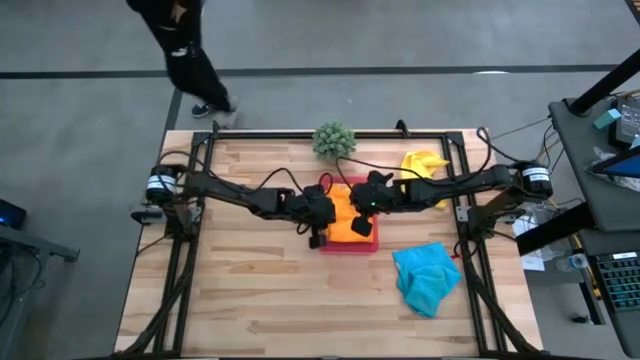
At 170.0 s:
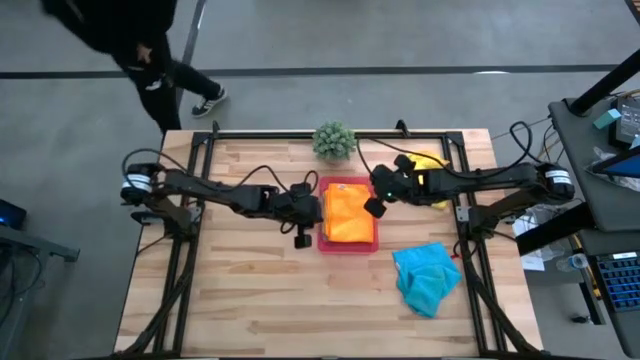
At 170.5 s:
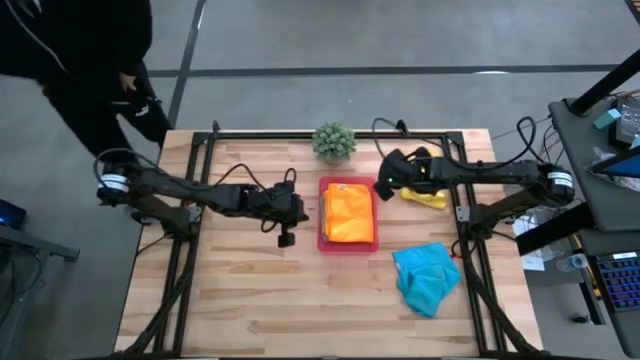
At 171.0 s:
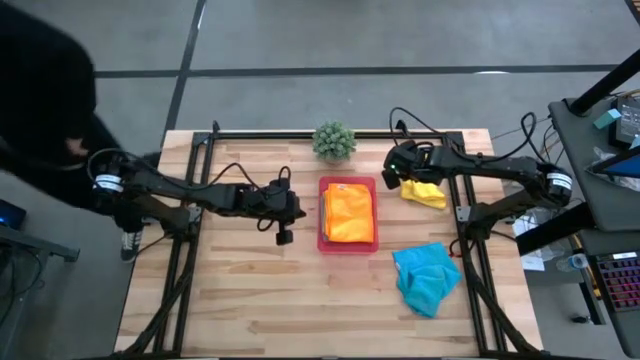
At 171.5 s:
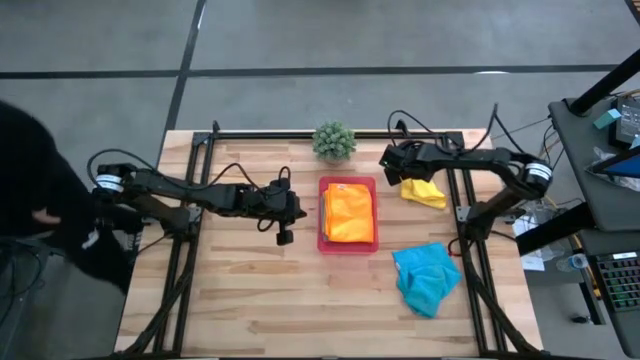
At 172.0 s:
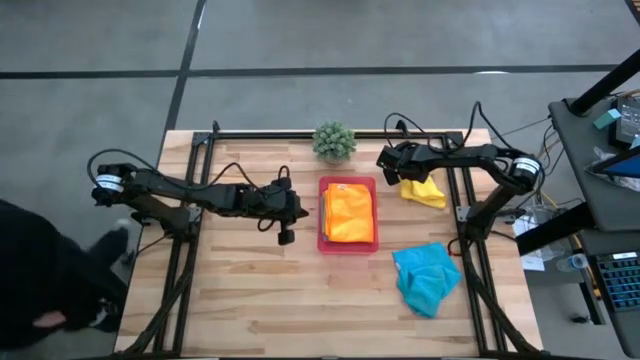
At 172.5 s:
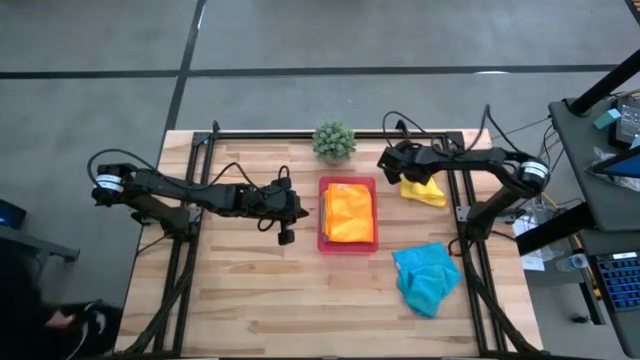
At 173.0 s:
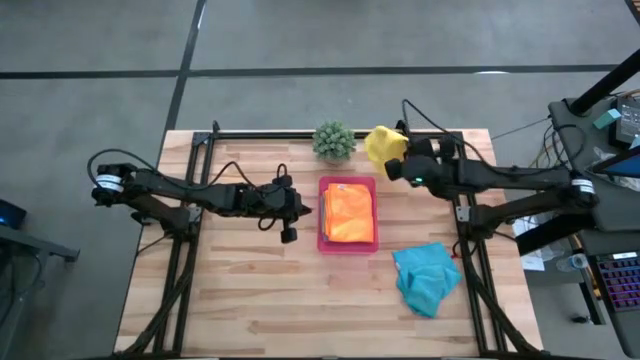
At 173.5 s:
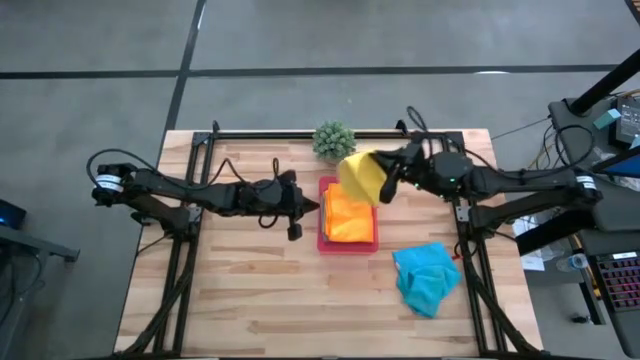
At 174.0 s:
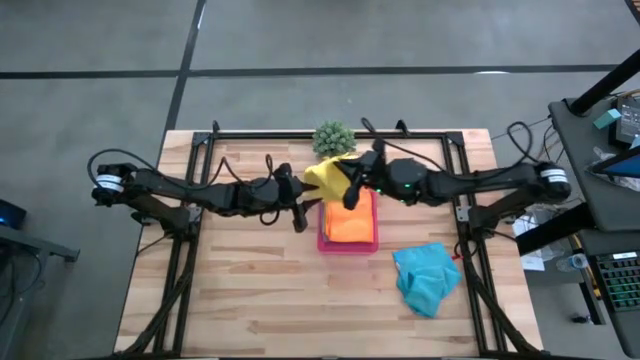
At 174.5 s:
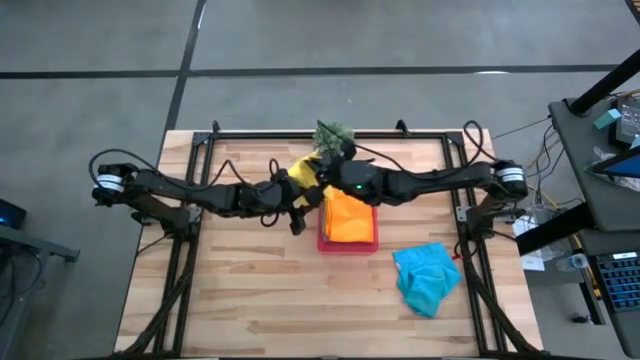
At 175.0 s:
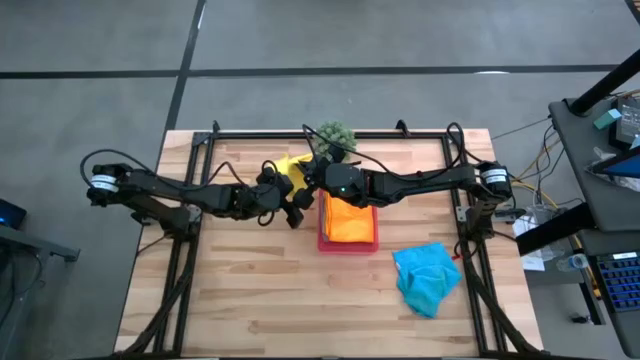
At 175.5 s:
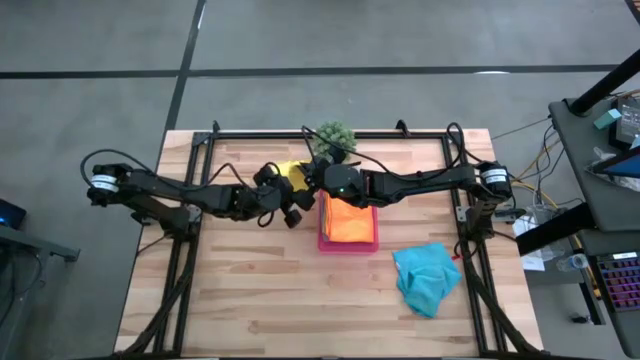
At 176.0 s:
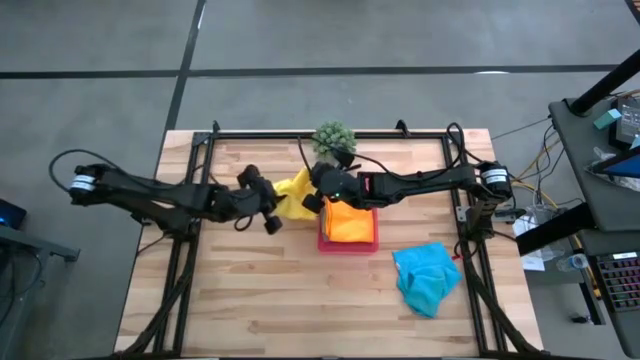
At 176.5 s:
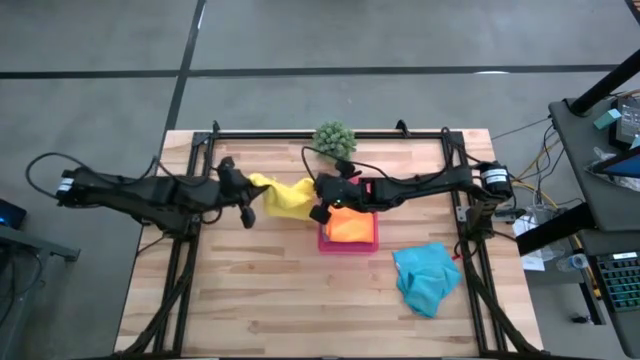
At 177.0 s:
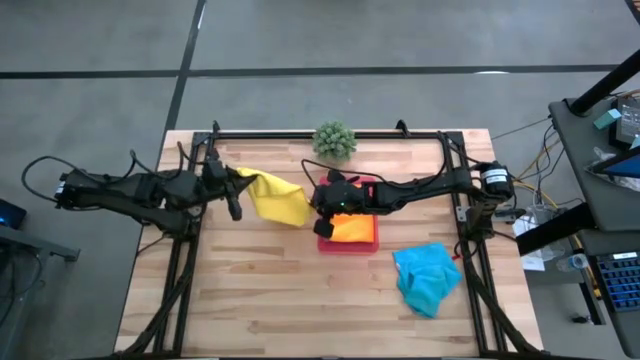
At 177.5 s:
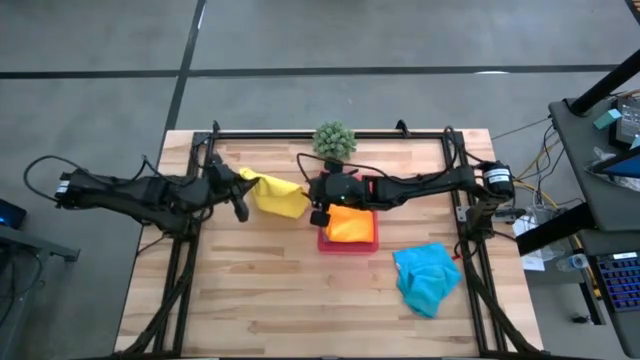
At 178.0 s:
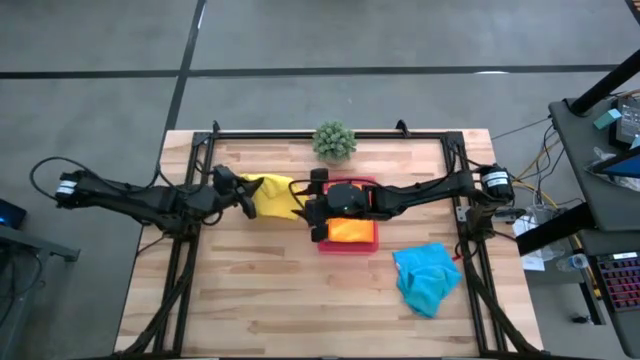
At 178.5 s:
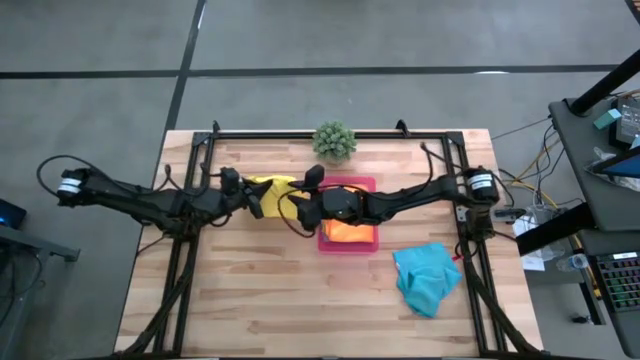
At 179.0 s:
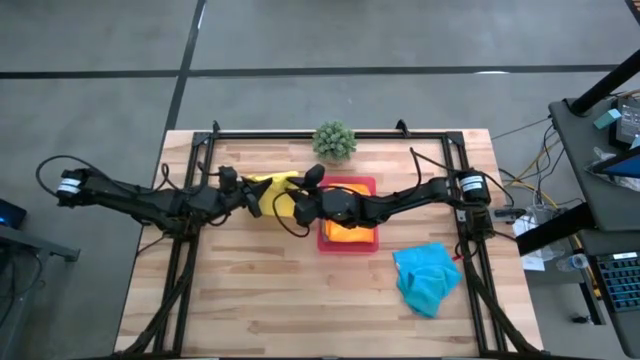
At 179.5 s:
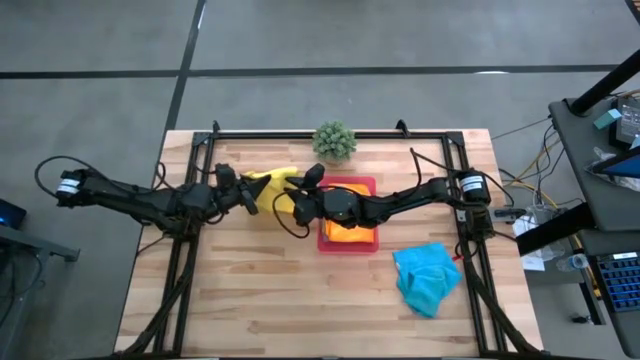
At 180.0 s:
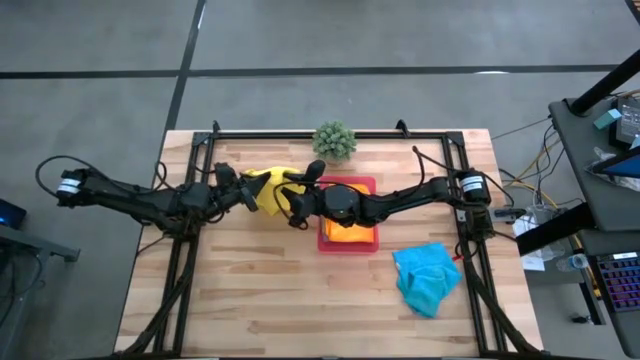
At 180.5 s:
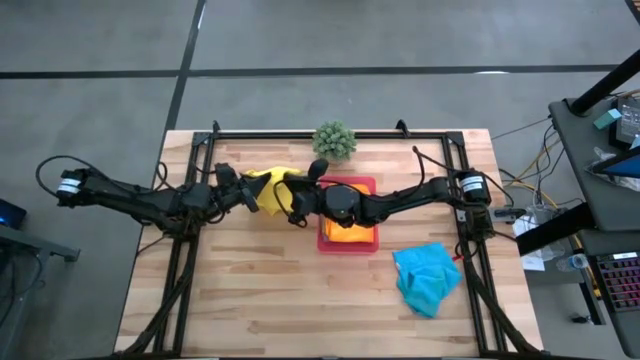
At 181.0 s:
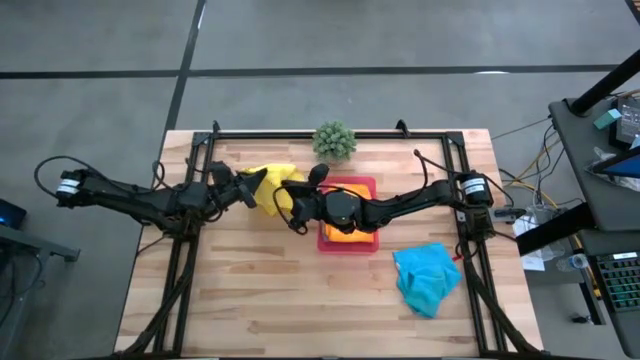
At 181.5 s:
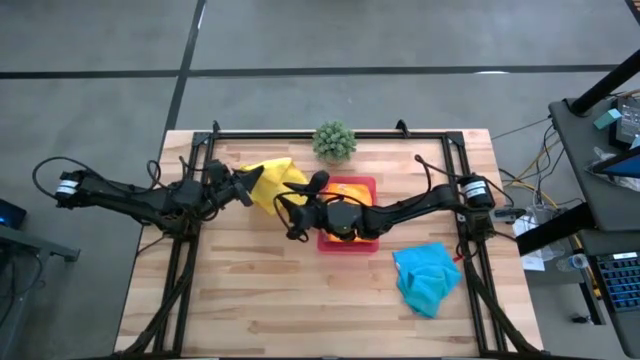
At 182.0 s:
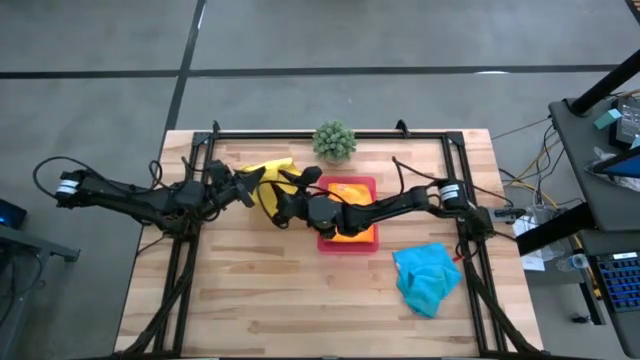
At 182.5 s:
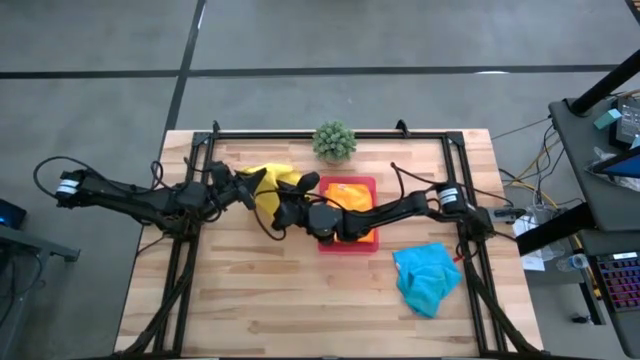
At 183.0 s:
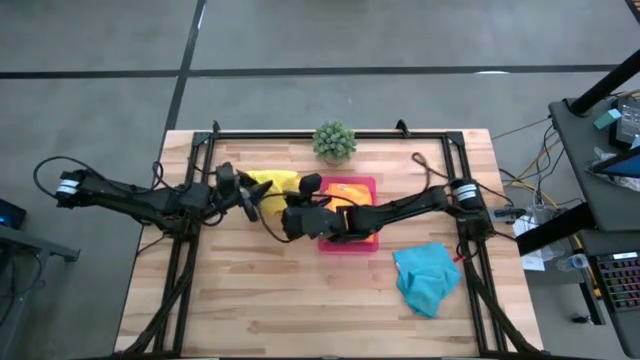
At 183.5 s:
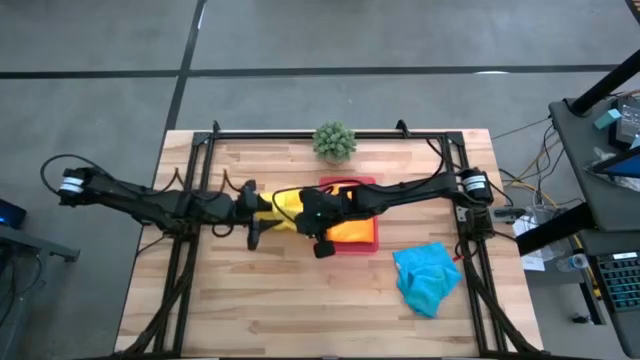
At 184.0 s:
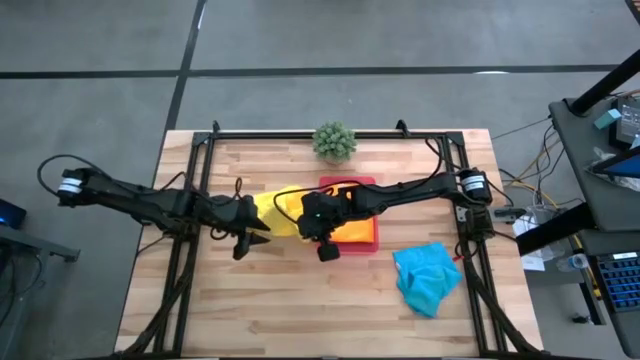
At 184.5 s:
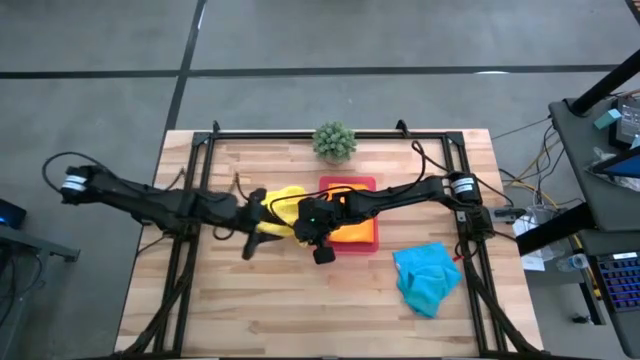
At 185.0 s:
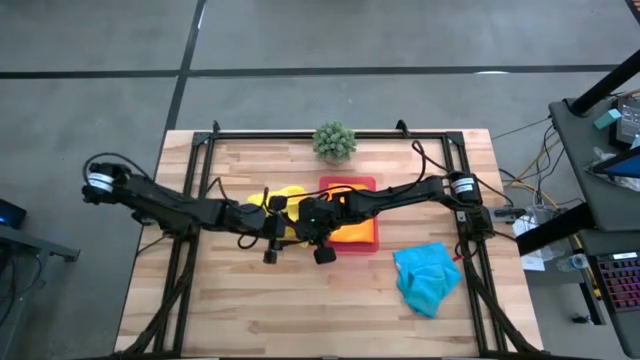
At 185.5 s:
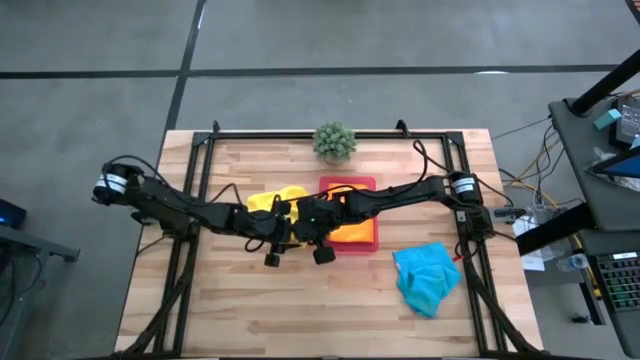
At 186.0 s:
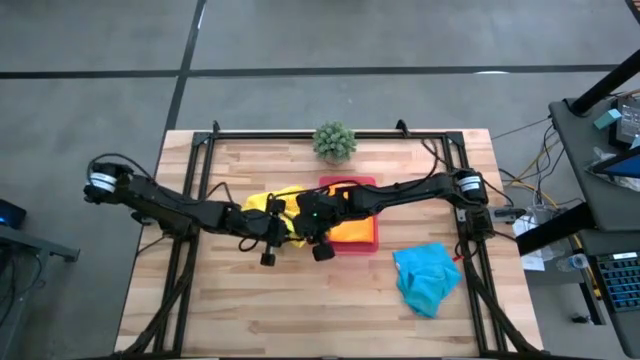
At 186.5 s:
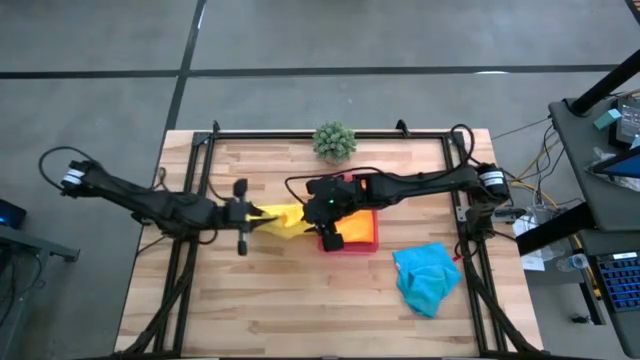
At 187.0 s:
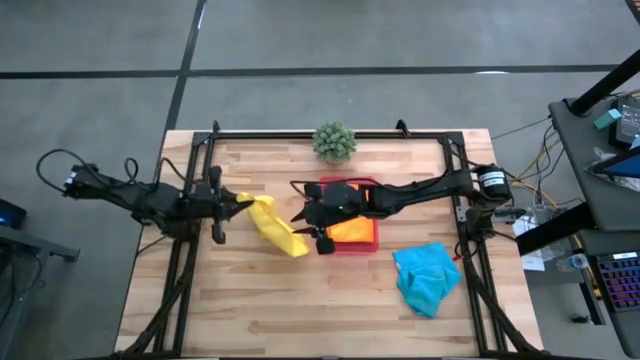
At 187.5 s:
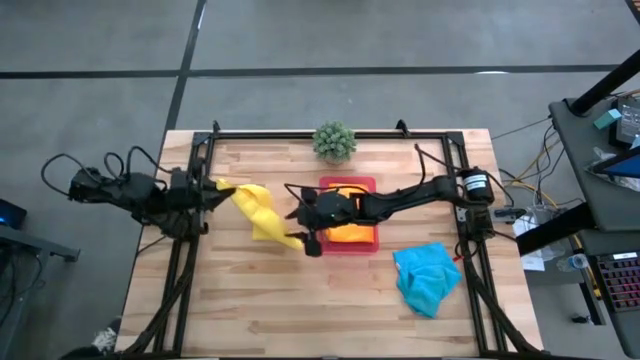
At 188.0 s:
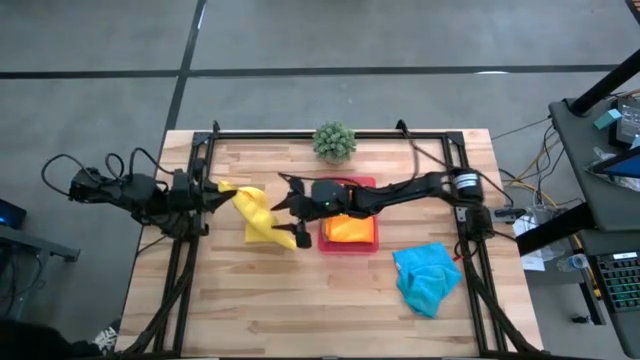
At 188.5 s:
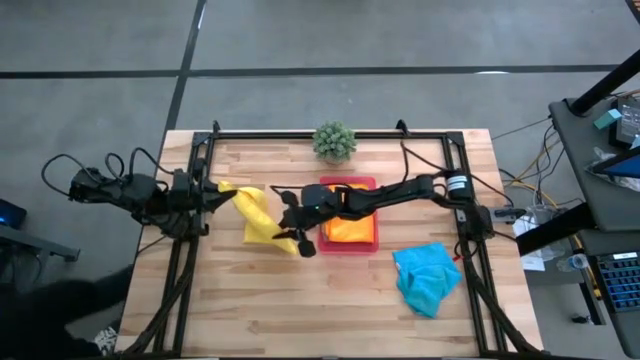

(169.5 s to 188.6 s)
Task: Fold microfiber towels
Fold the yellow towel

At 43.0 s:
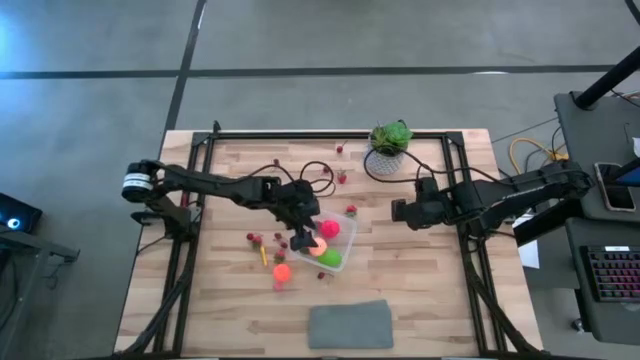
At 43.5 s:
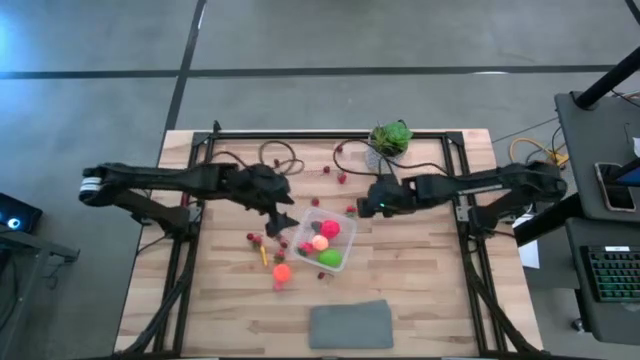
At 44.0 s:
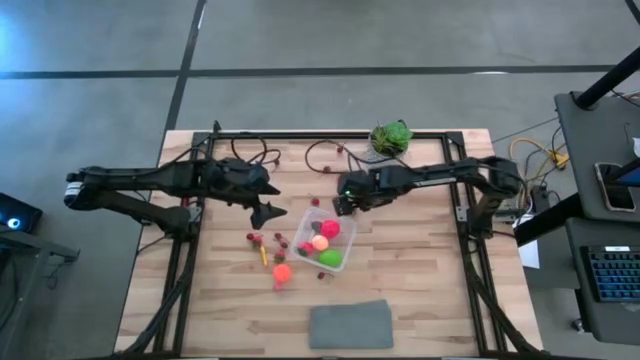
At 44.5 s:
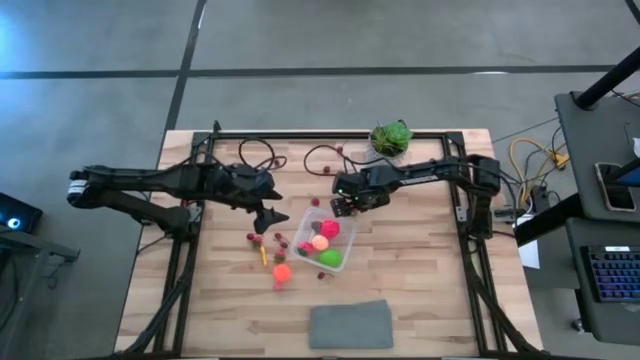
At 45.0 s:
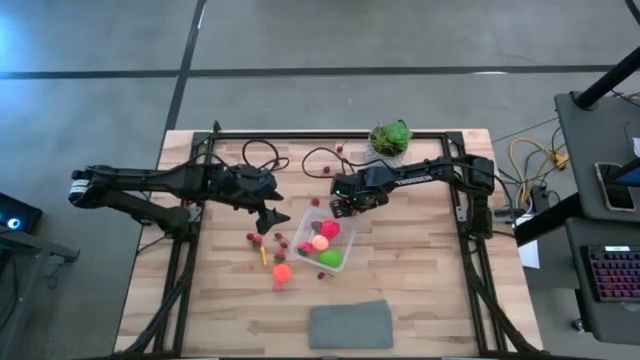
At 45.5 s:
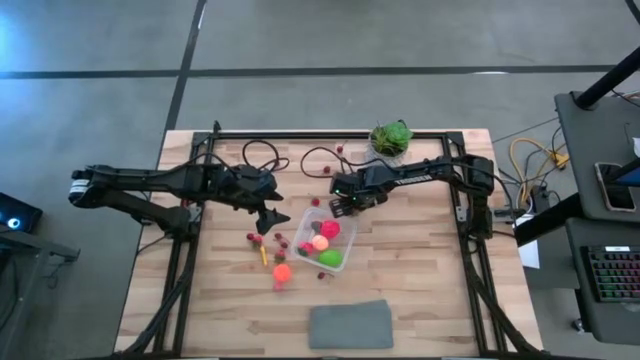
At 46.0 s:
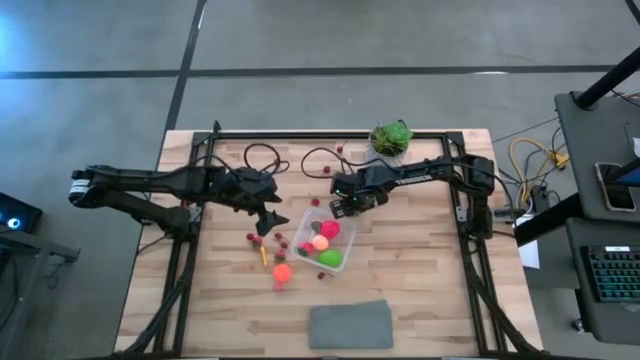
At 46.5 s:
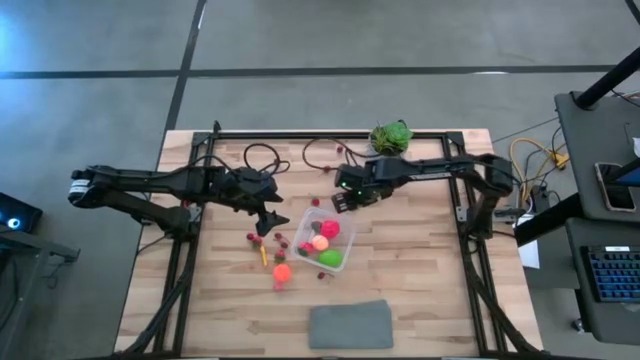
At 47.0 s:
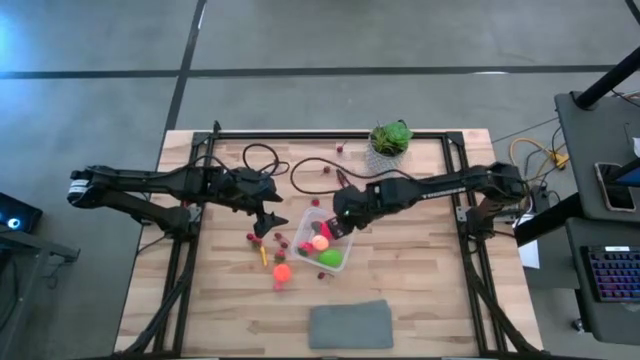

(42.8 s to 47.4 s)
Task: Pick and placing Produce into tupperware
Put the red strawberry into the transparent container
